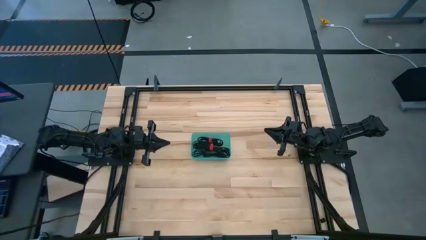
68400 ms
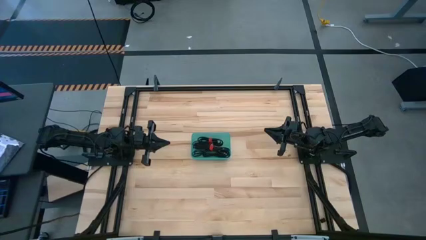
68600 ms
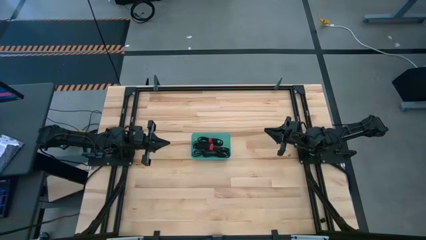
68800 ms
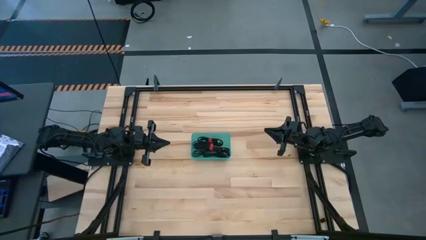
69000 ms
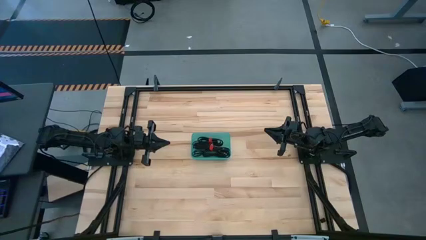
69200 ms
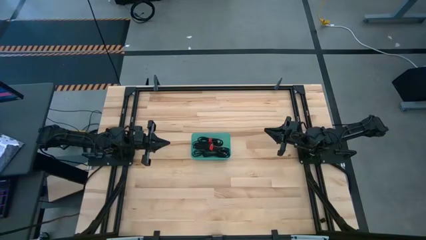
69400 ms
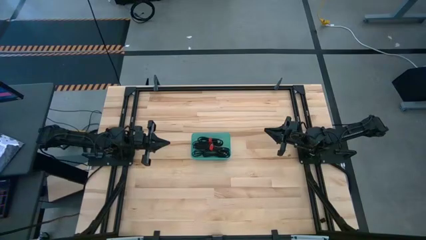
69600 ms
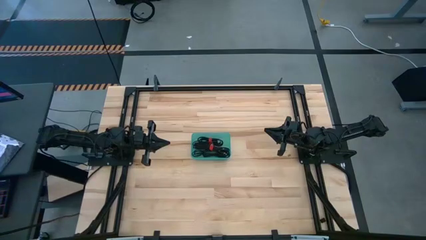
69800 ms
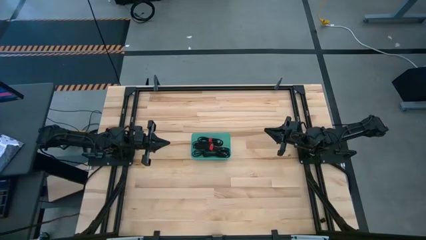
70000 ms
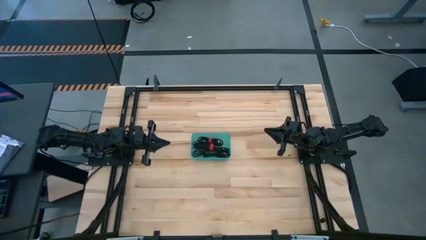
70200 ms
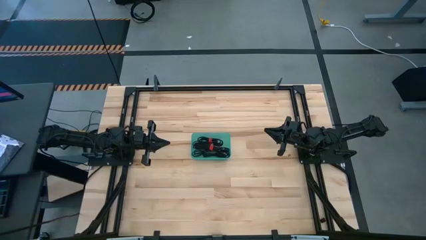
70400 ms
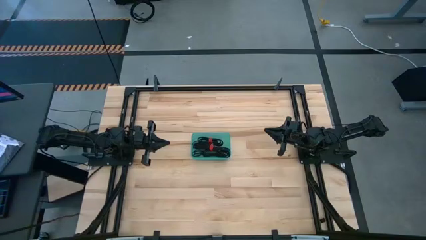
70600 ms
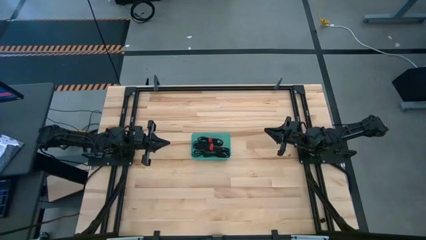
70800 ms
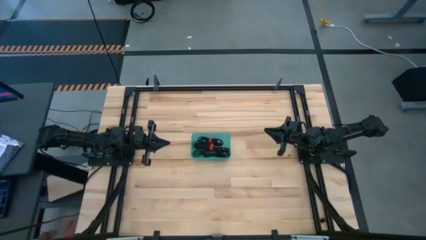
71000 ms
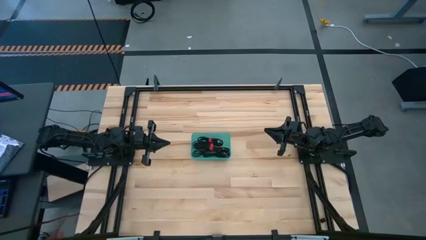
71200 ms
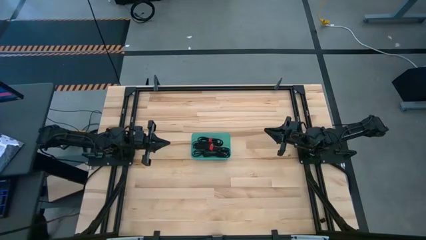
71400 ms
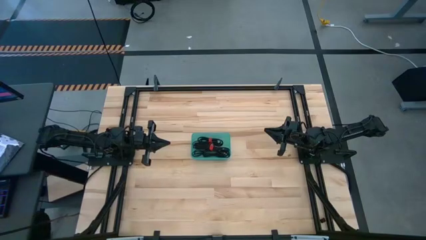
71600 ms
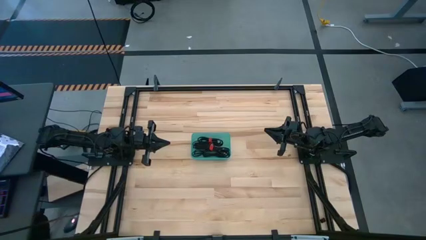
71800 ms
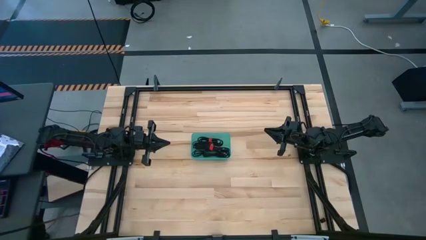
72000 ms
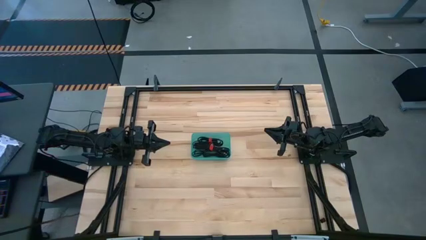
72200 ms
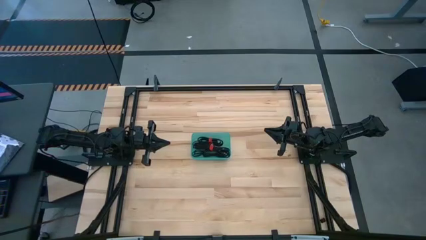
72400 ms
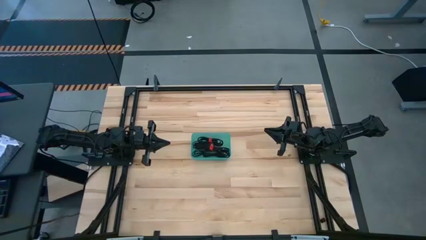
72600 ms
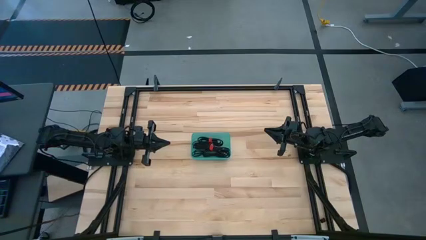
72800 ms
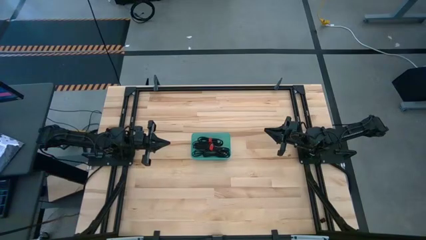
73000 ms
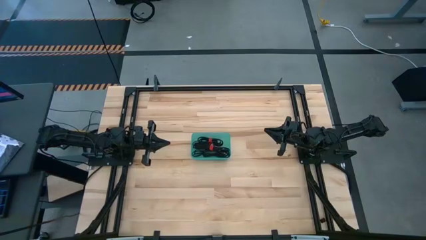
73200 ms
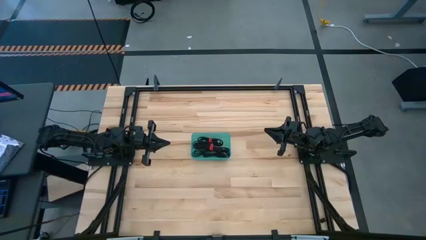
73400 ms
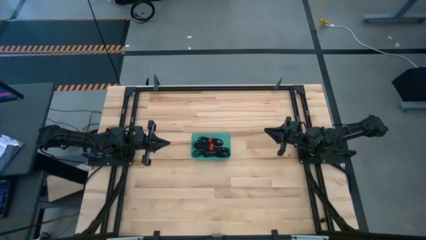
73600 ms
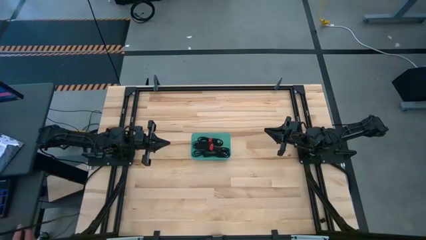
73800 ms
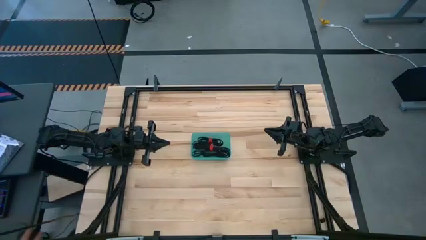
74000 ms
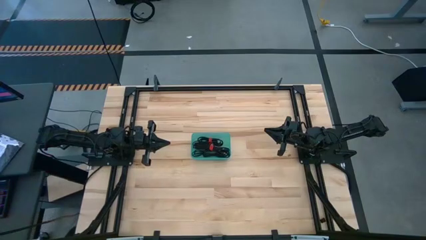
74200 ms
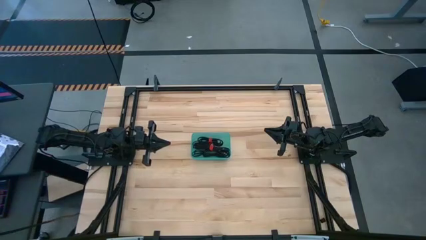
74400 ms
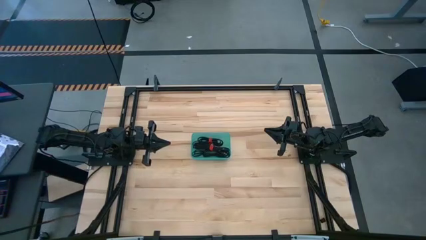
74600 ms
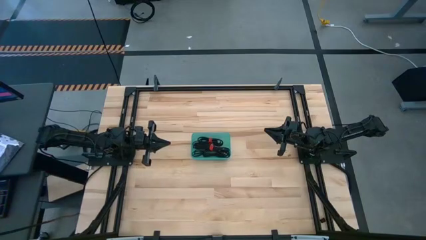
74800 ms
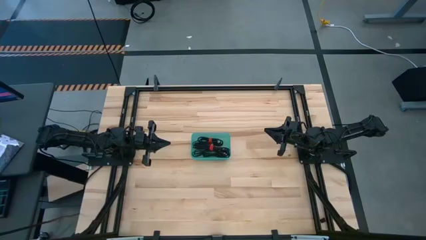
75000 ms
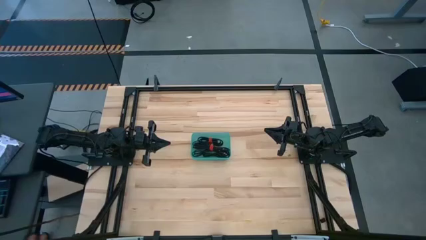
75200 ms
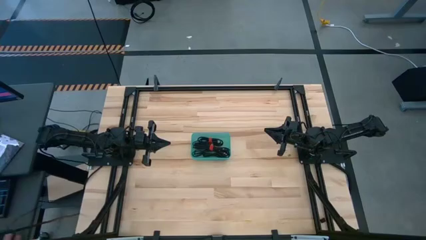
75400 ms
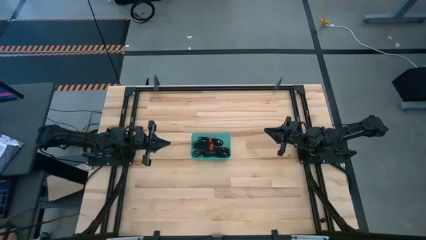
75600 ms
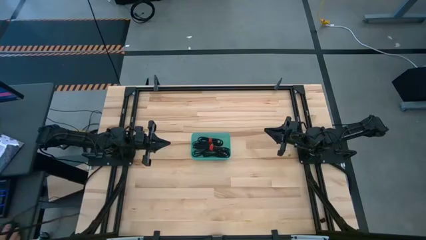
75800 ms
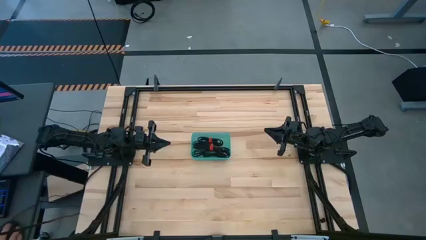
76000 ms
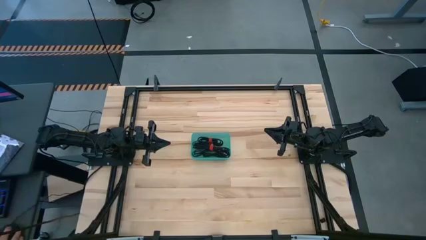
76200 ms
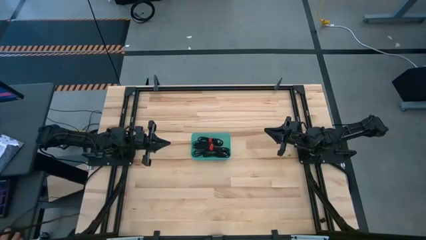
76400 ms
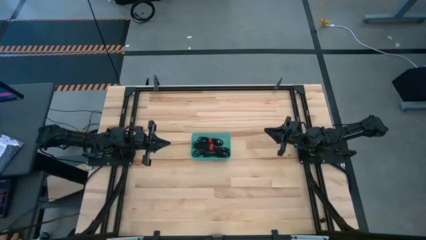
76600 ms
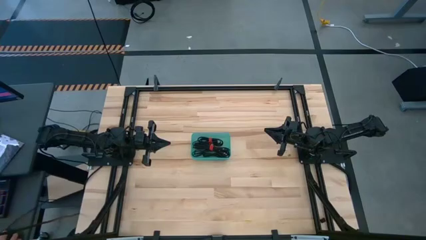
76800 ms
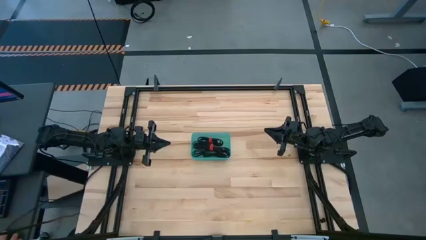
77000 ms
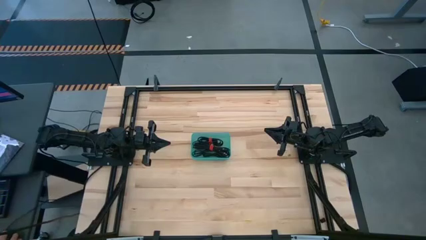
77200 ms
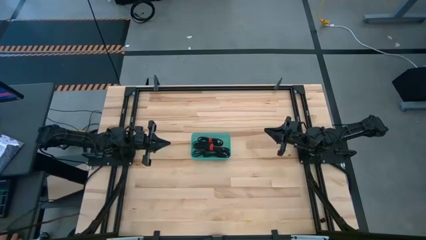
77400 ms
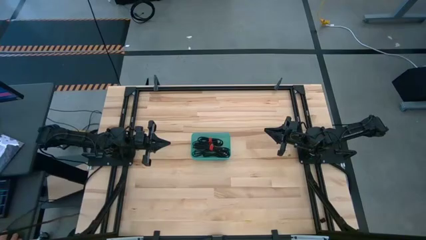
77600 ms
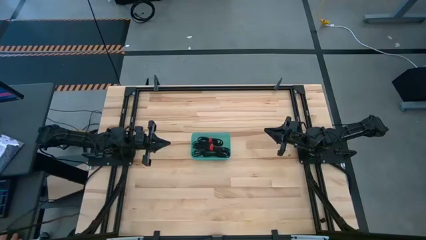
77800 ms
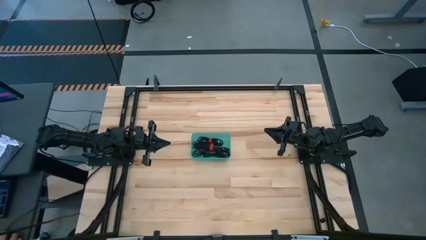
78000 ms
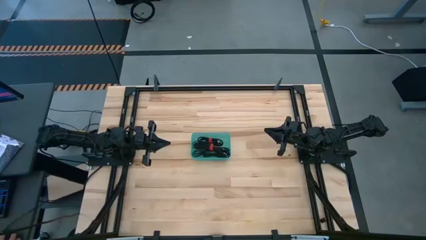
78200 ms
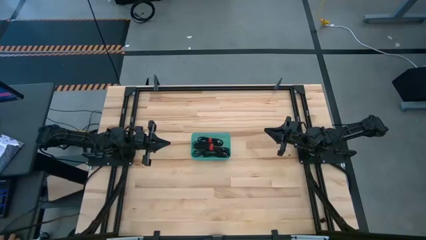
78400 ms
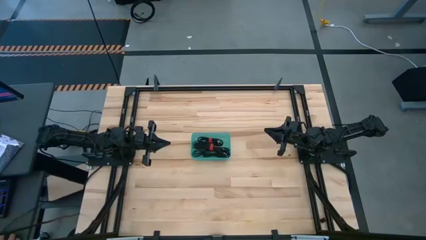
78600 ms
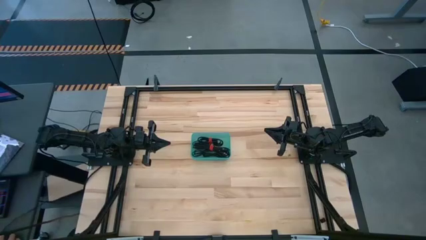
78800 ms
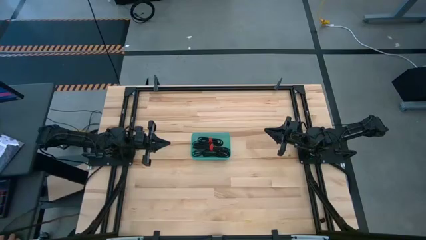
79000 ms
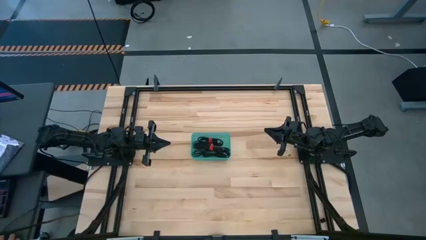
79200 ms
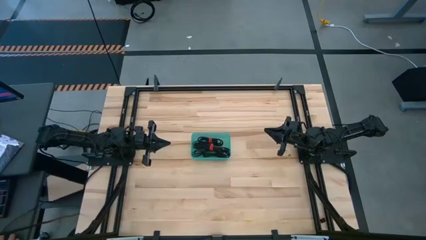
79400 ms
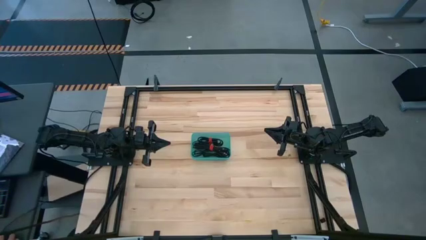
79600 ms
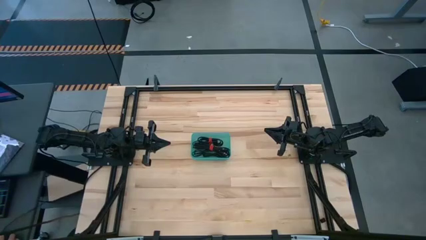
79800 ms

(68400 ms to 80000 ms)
Task: Pick and place USB-C Cables
Return to Home Position
